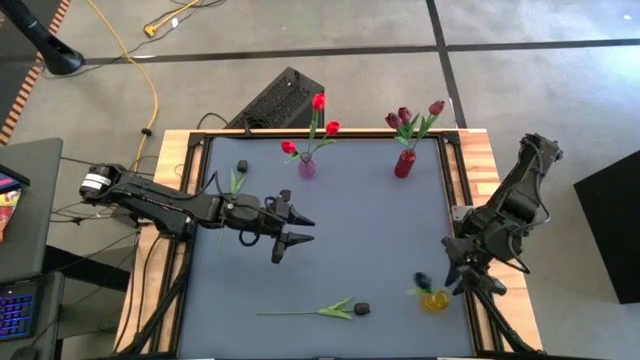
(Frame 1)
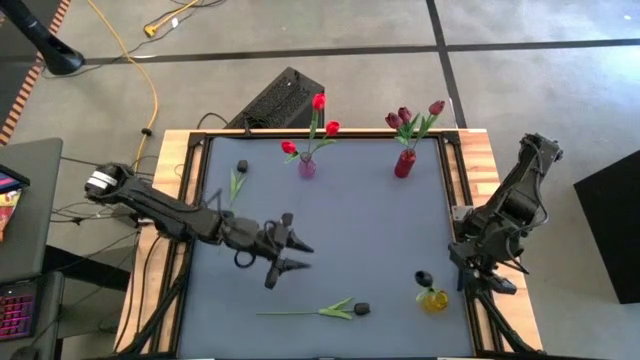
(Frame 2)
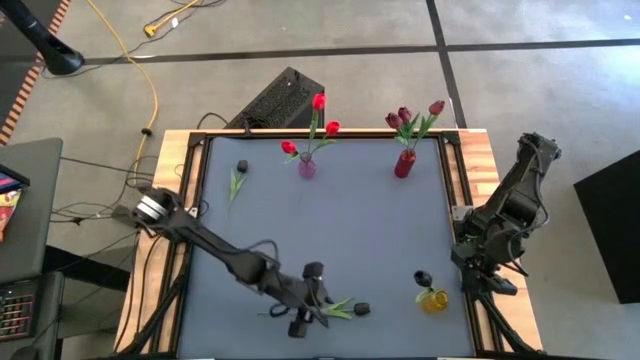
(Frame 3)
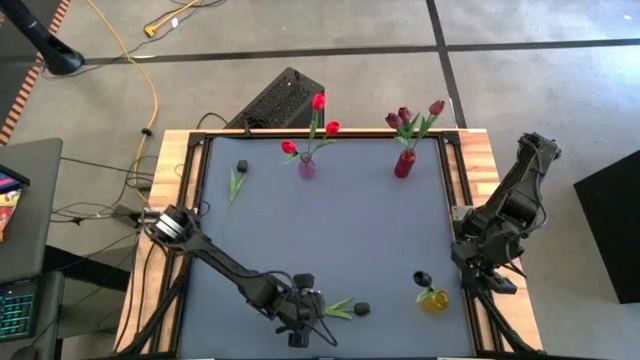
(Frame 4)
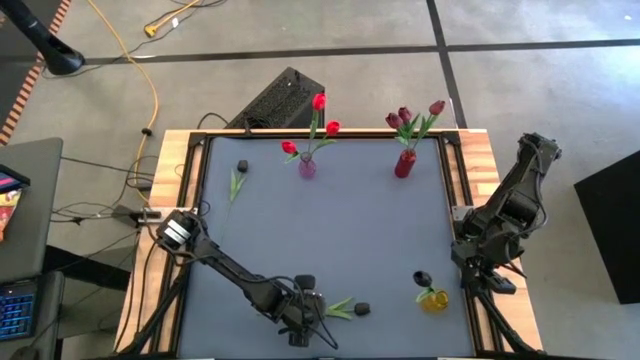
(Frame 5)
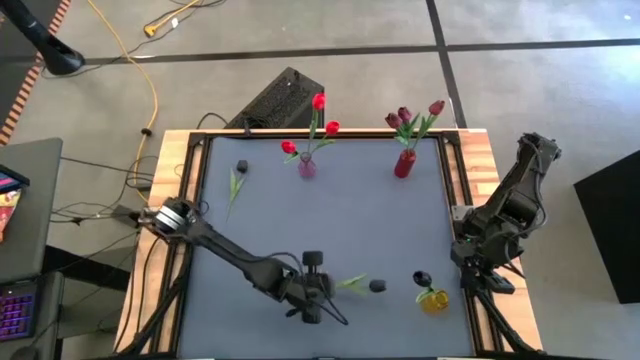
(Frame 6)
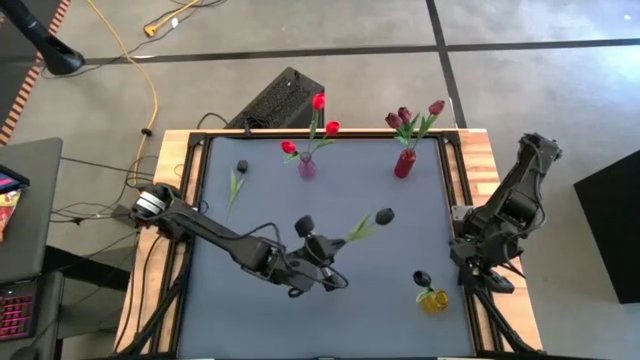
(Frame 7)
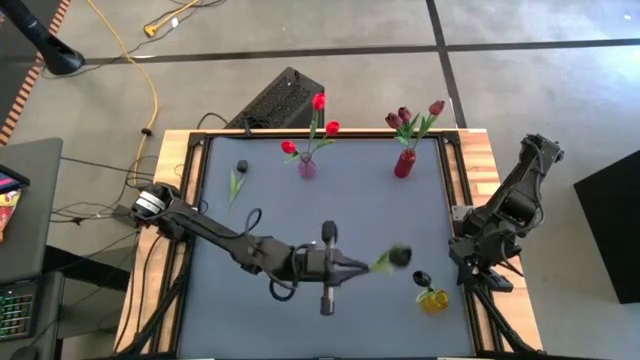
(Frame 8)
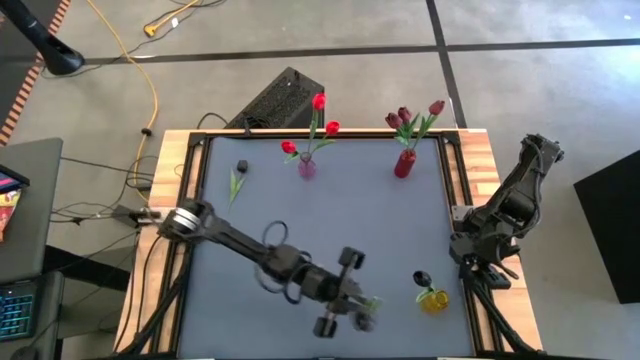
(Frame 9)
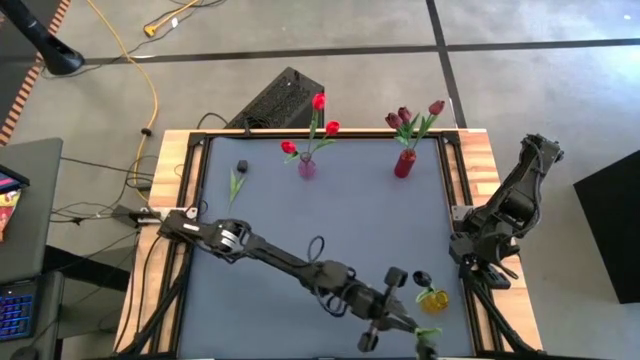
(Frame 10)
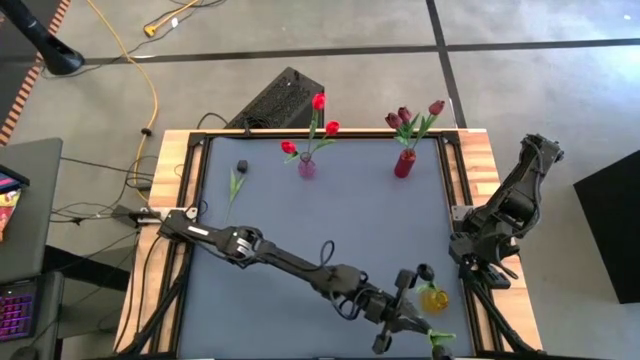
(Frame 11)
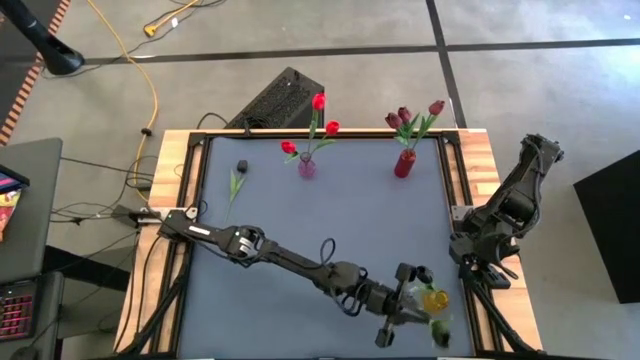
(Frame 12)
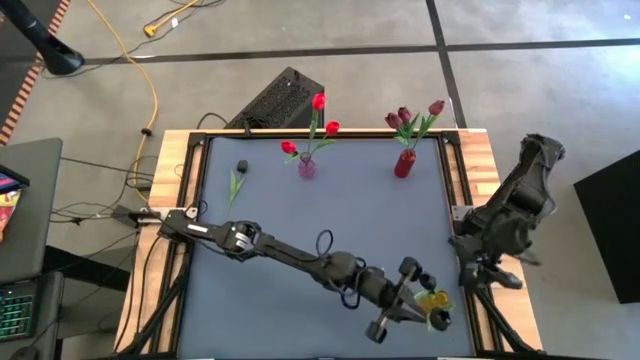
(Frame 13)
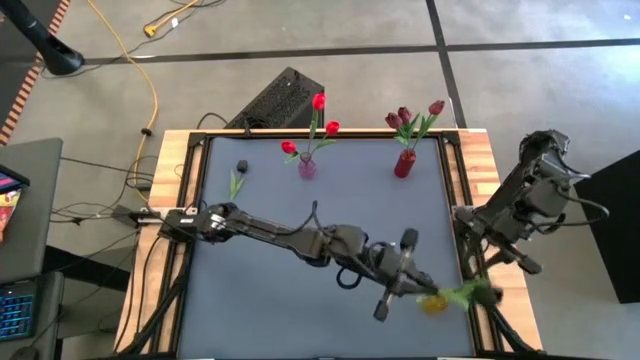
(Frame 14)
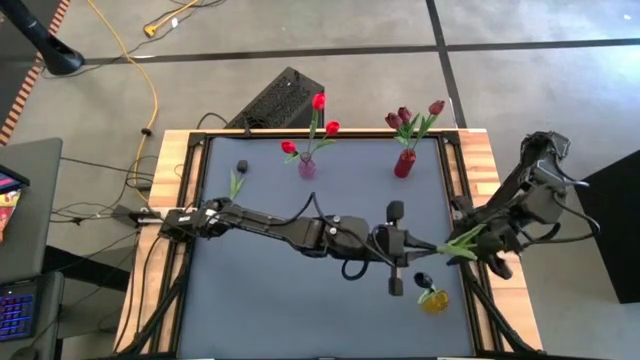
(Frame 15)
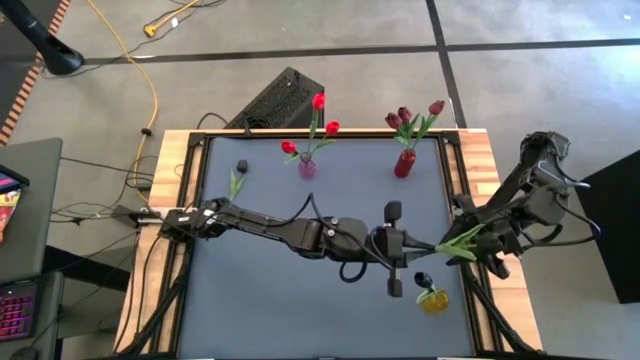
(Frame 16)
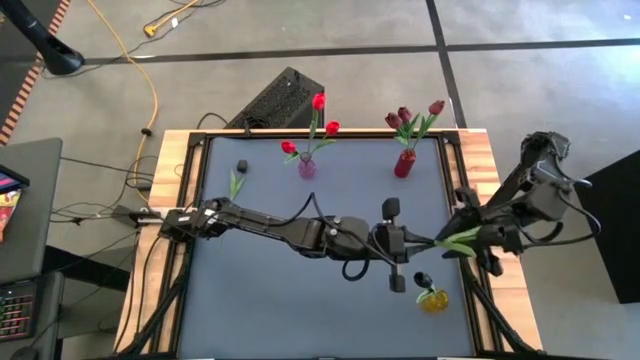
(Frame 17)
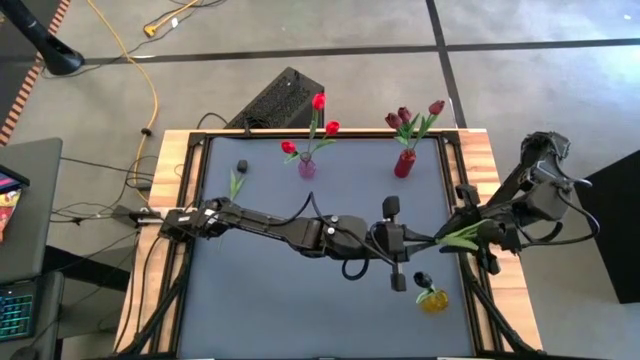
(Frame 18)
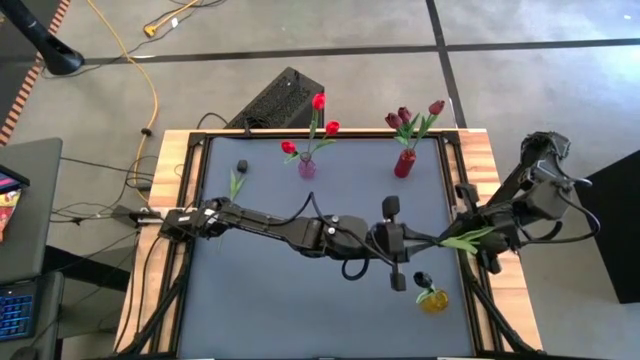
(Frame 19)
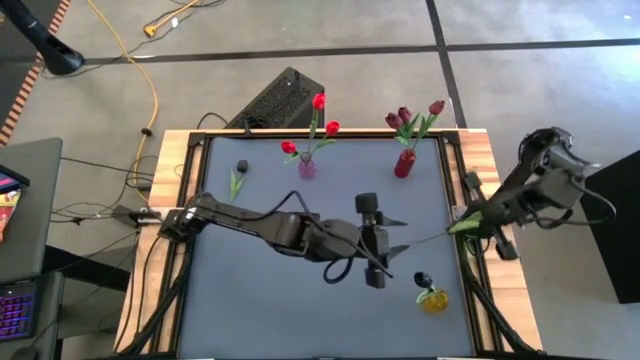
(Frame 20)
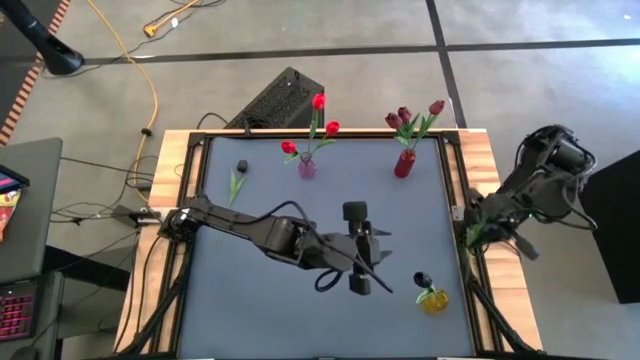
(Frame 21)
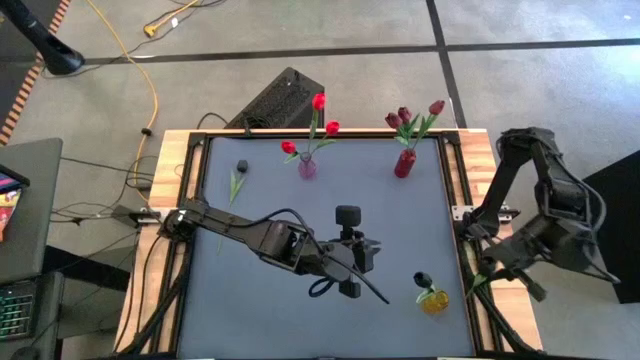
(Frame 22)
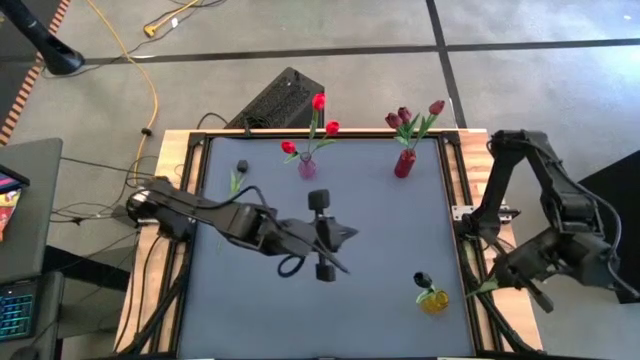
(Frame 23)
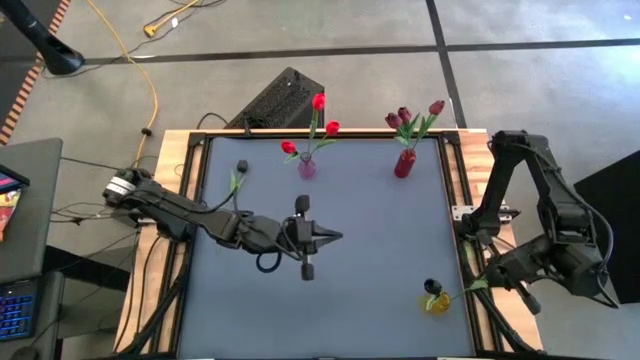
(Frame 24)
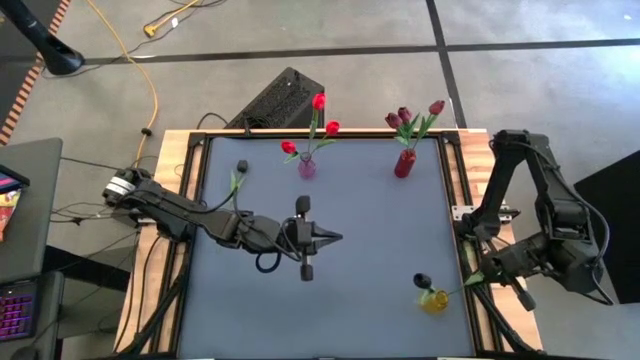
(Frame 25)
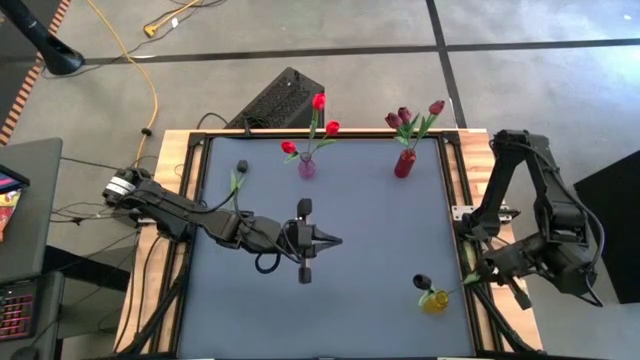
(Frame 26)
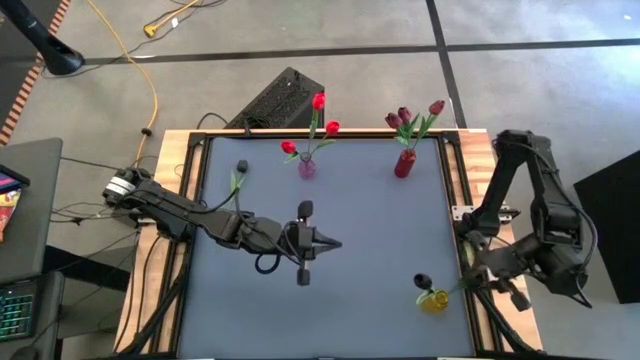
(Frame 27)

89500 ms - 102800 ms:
Task: Sort flowers into vase by color
Put the bottom black flower into the yellow vase

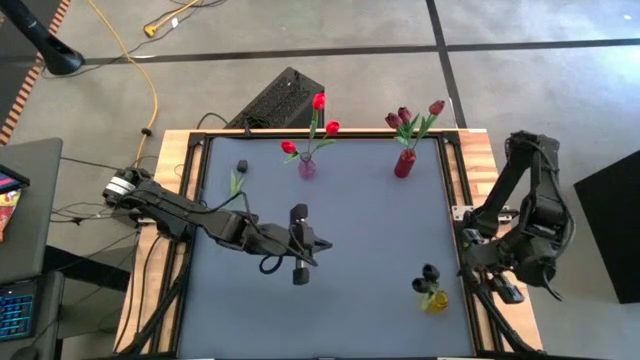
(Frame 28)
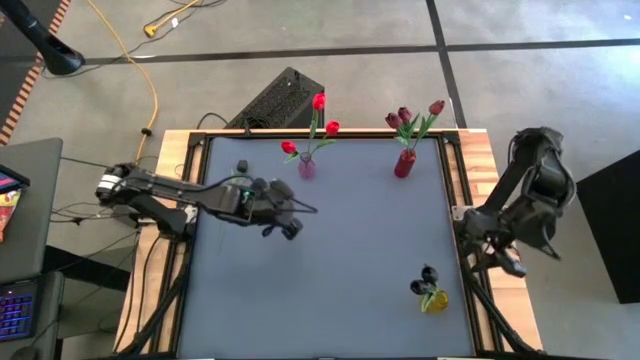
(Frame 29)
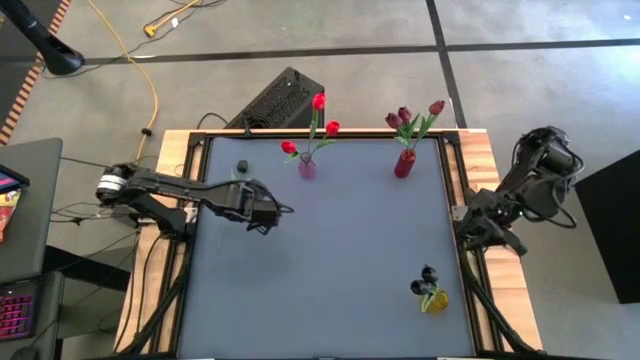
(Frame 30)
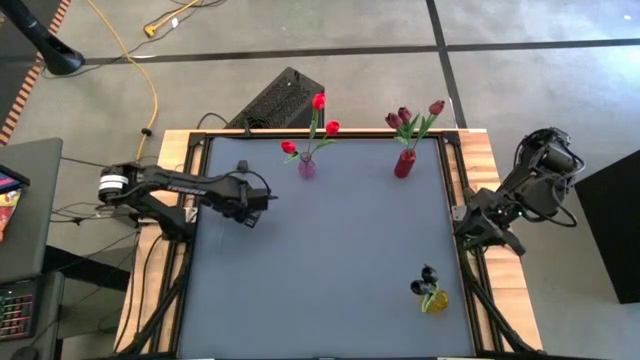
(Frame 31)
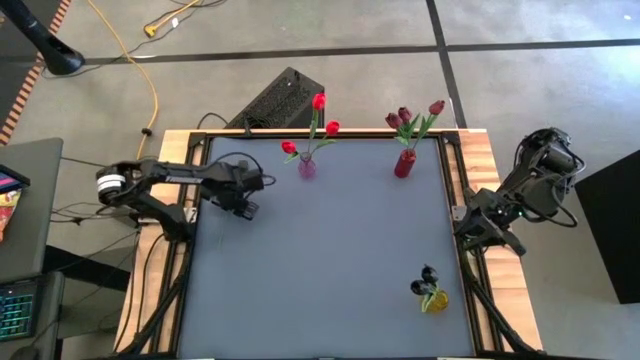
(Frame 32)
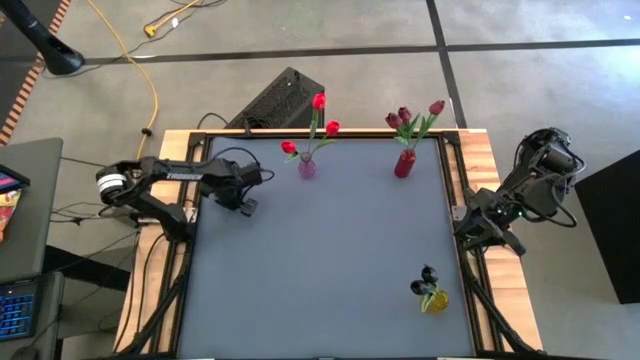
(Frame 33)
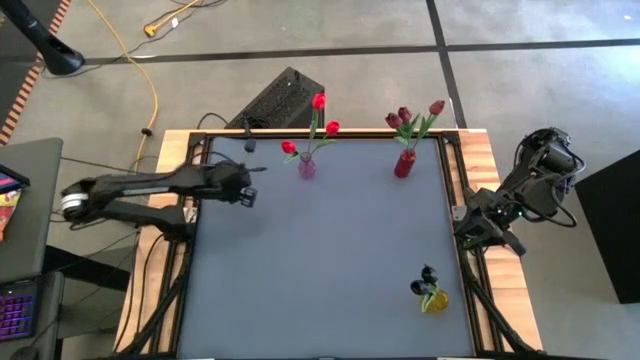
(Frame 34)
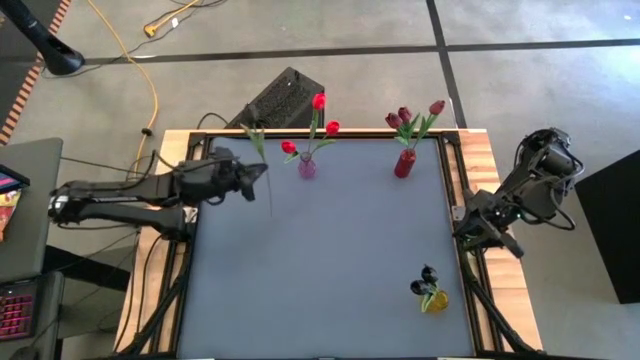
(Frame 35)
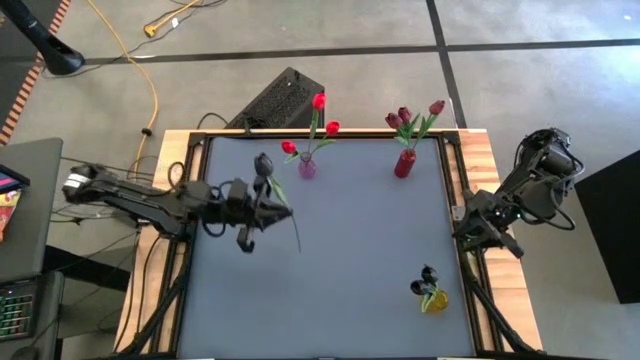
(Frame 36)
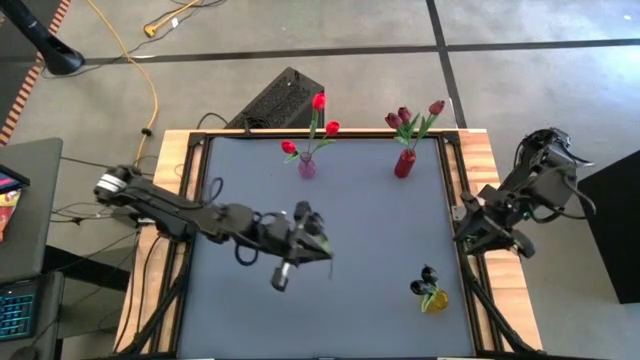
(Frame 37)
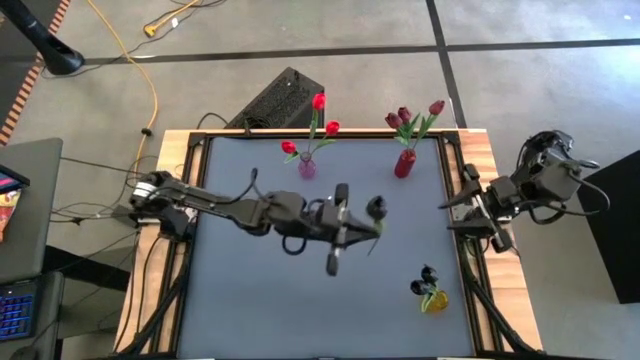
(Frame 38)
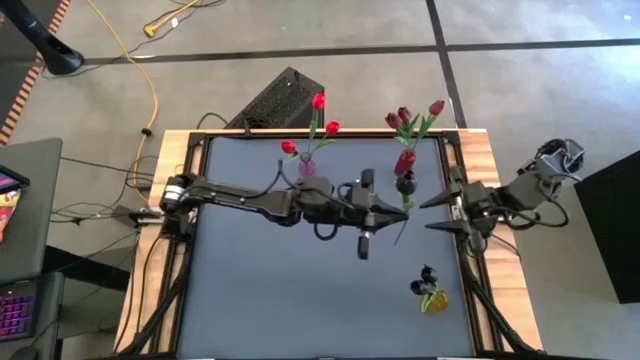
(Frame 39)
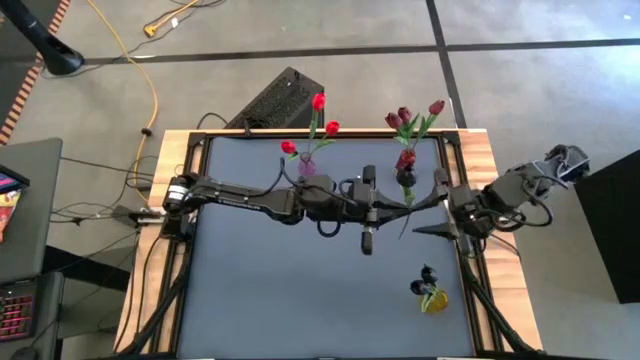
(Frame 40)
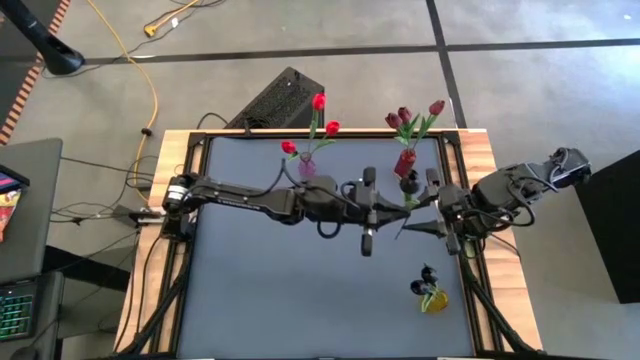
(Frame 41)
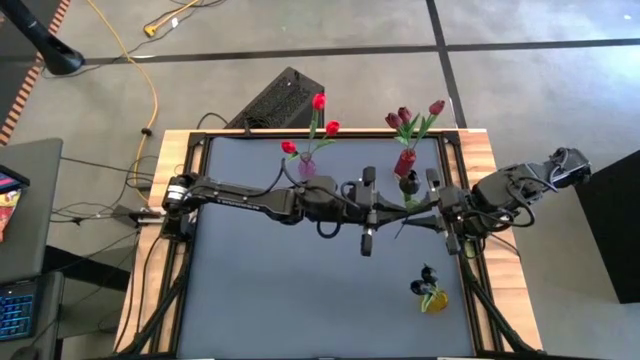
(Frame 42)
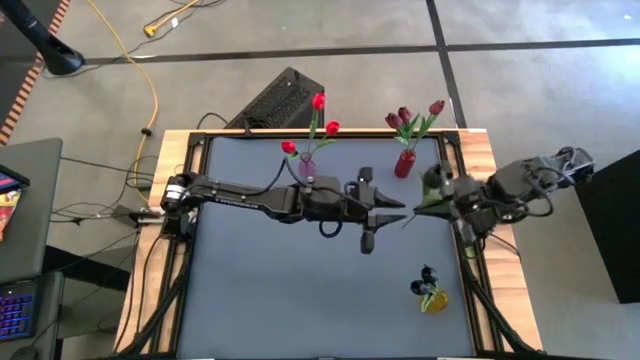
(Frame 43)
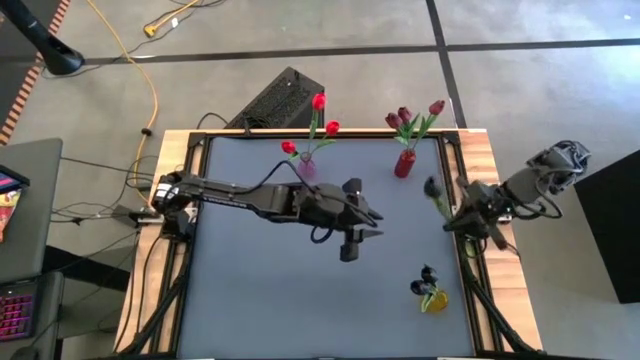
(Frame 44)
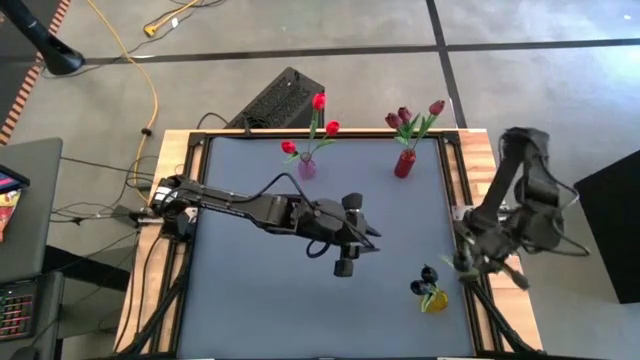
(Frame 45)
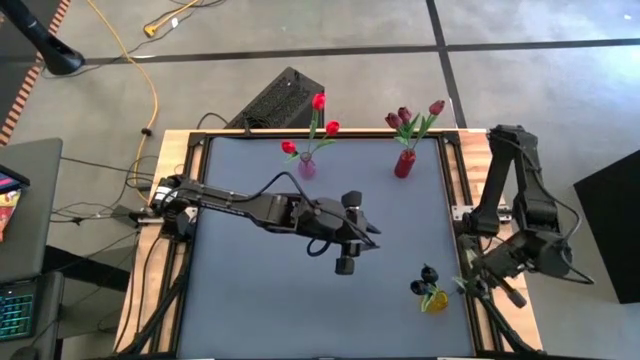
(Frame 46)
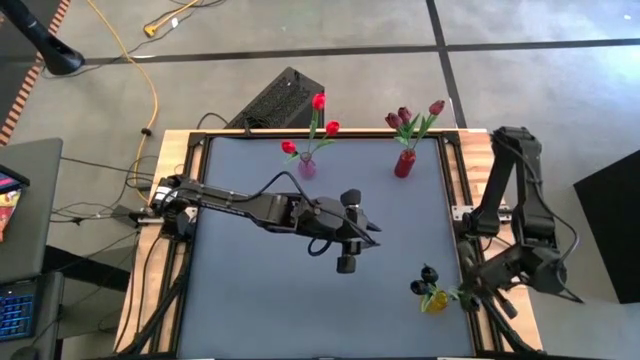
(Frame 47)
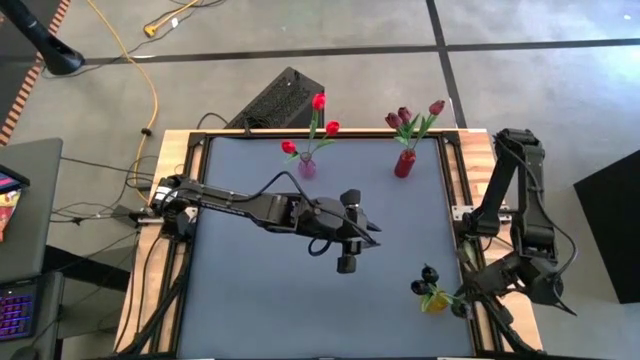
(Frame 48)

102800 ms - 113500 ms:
Put the black flower into the yellow vase
